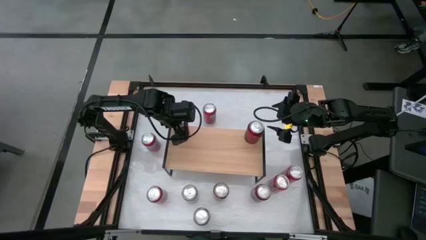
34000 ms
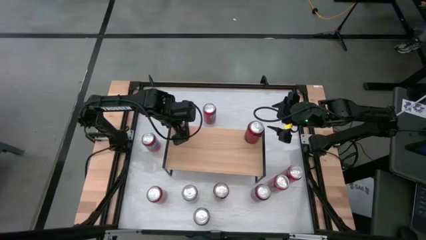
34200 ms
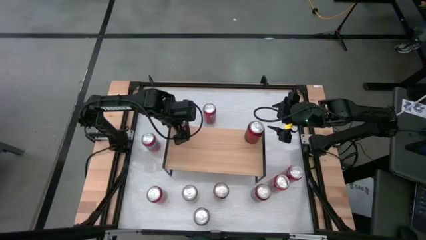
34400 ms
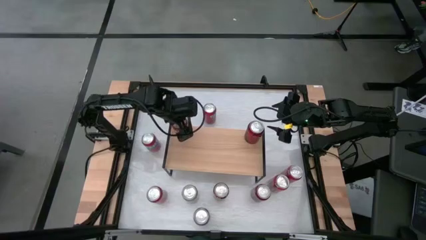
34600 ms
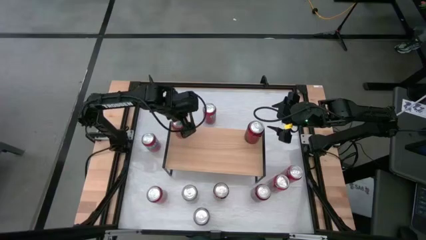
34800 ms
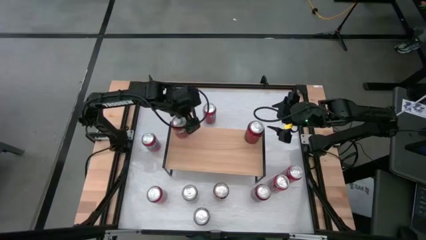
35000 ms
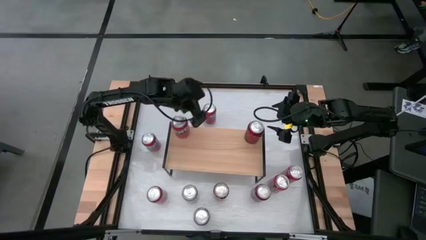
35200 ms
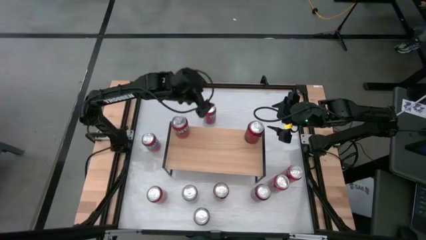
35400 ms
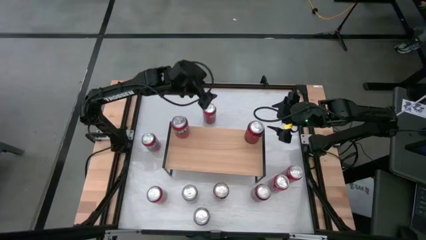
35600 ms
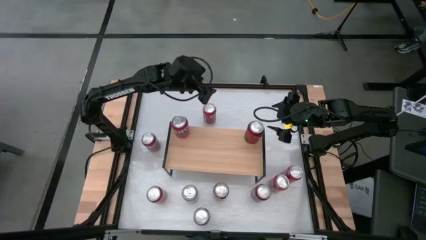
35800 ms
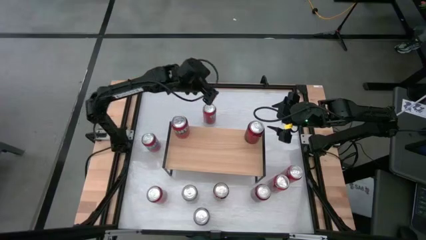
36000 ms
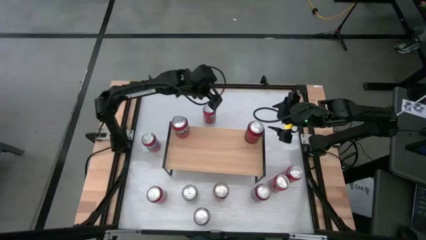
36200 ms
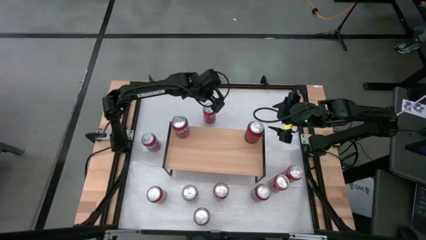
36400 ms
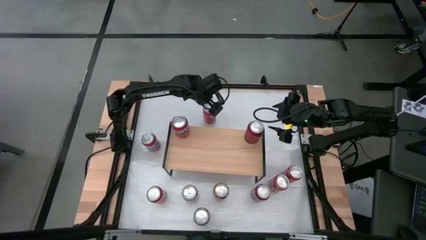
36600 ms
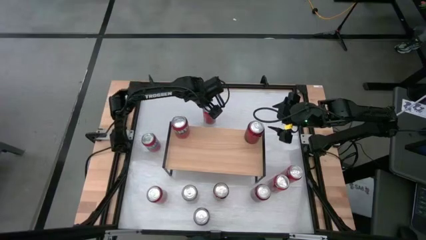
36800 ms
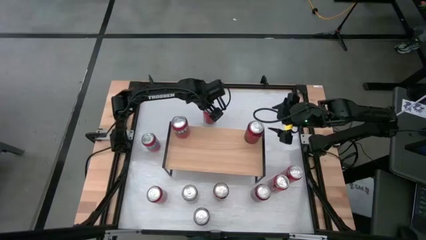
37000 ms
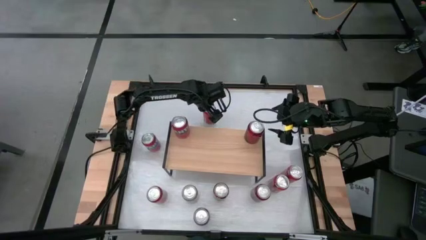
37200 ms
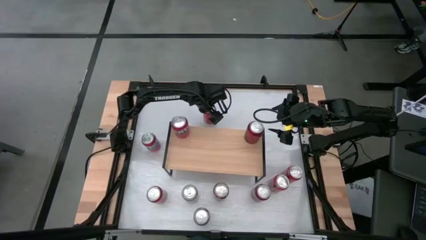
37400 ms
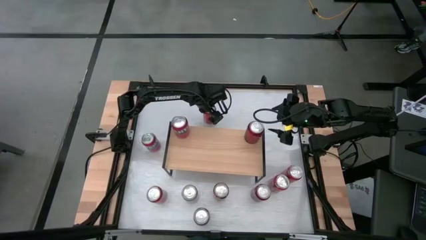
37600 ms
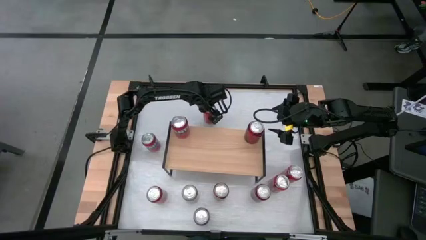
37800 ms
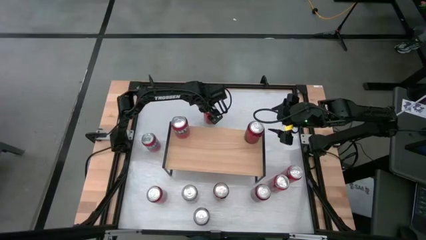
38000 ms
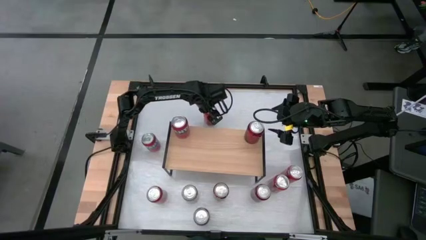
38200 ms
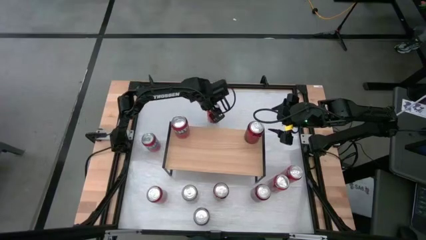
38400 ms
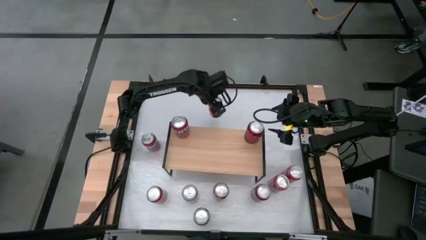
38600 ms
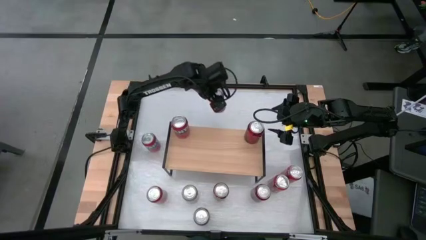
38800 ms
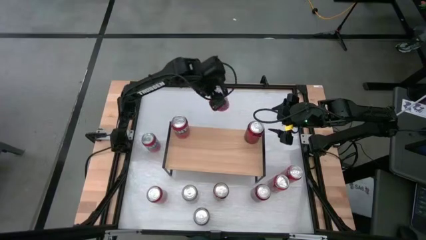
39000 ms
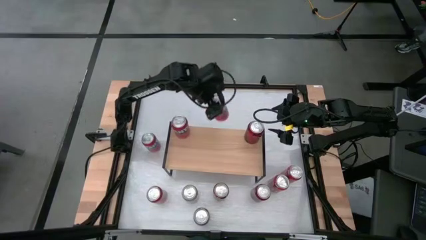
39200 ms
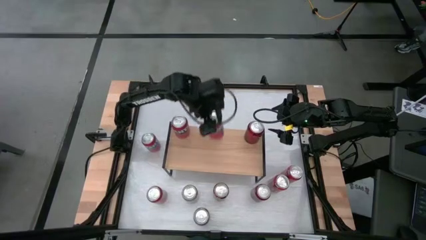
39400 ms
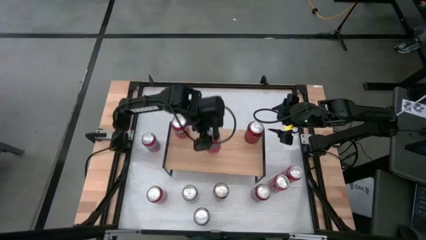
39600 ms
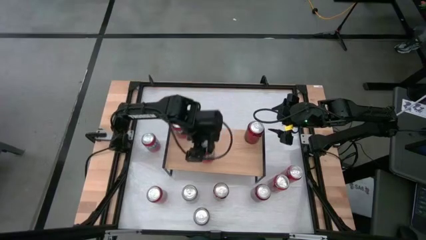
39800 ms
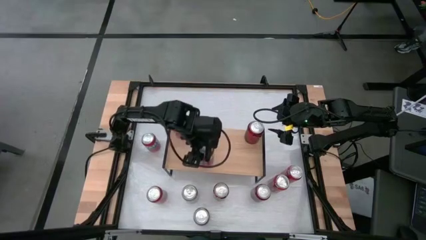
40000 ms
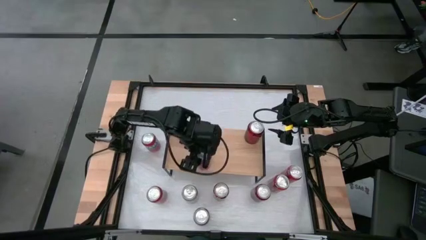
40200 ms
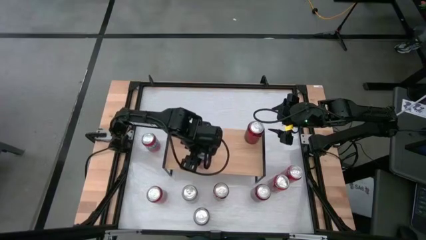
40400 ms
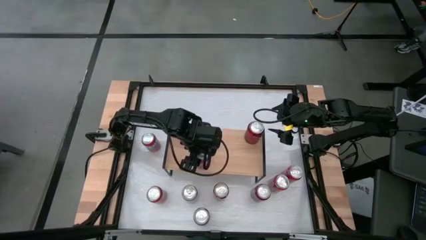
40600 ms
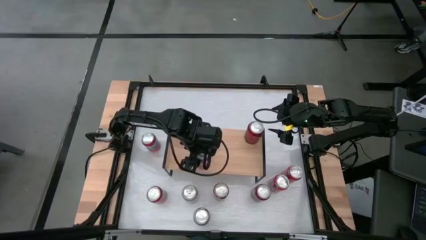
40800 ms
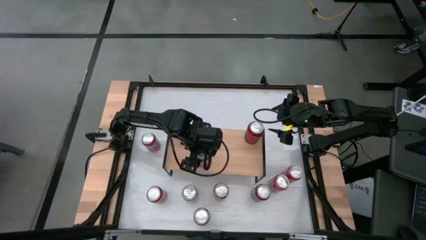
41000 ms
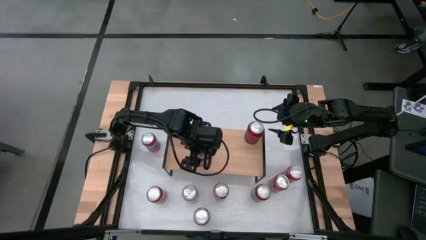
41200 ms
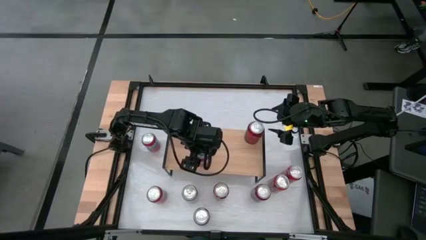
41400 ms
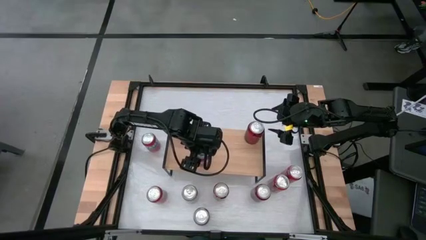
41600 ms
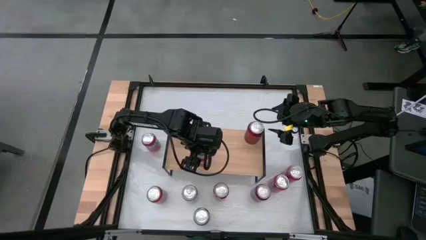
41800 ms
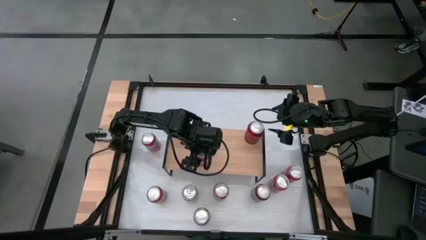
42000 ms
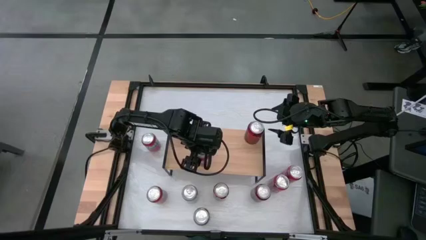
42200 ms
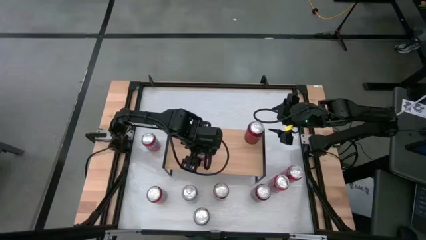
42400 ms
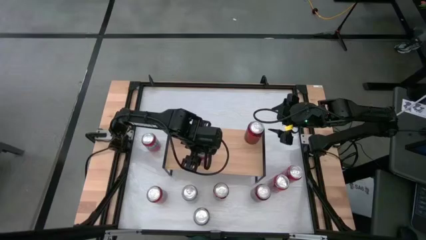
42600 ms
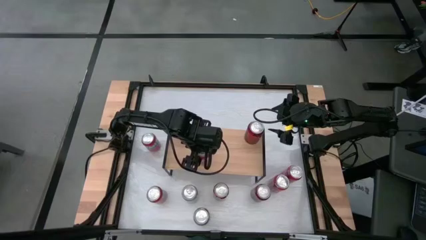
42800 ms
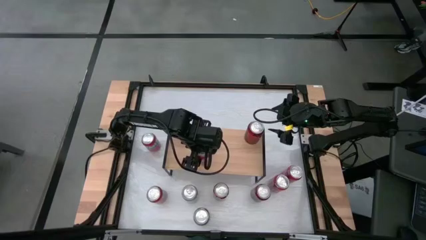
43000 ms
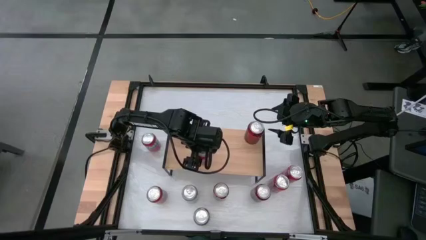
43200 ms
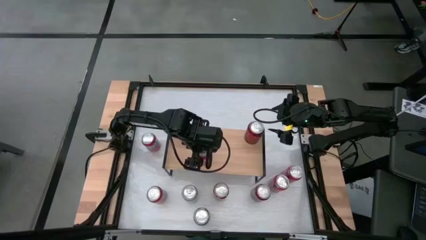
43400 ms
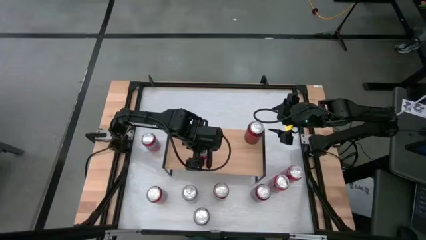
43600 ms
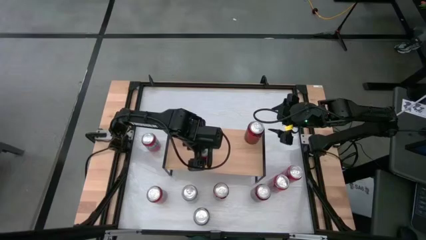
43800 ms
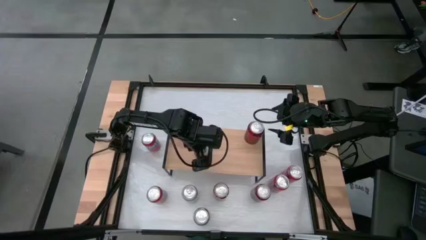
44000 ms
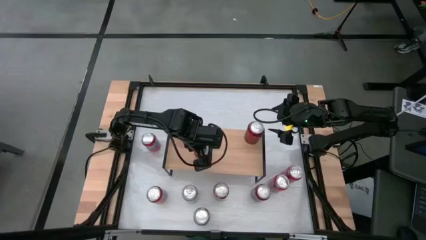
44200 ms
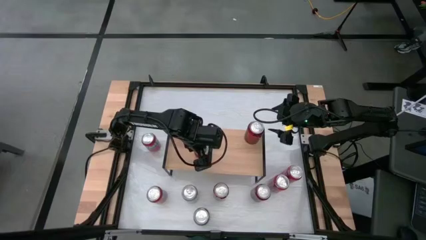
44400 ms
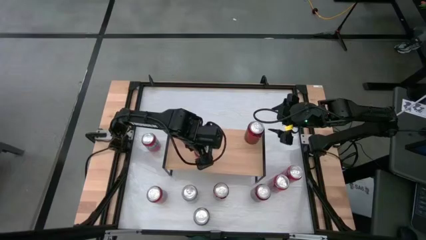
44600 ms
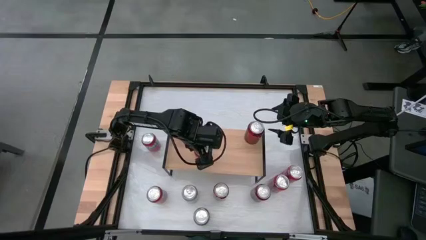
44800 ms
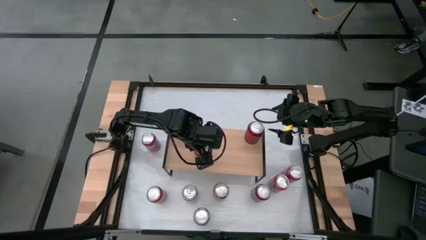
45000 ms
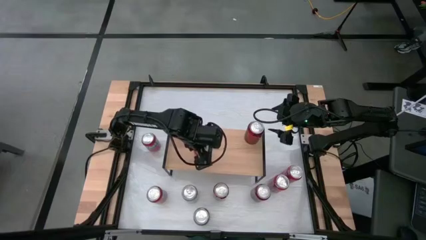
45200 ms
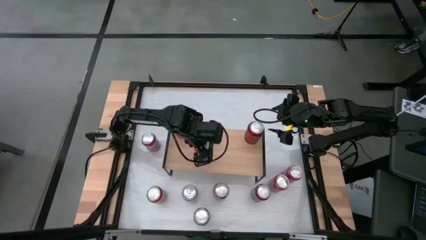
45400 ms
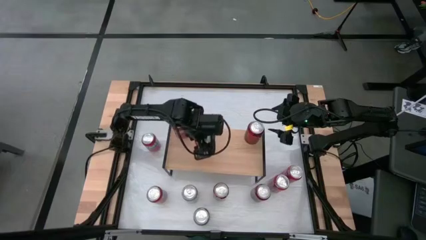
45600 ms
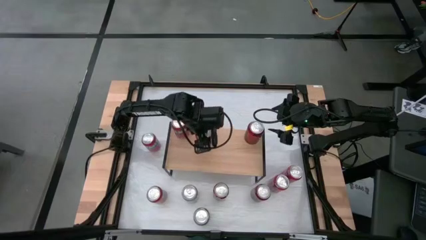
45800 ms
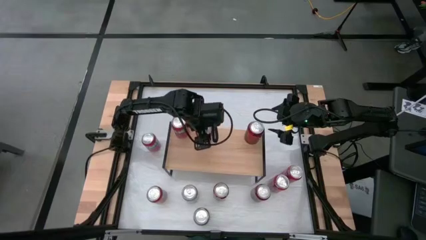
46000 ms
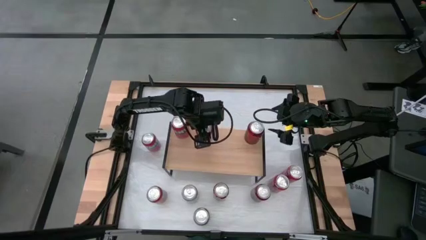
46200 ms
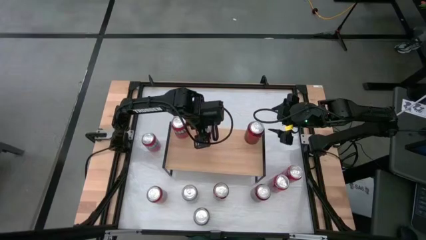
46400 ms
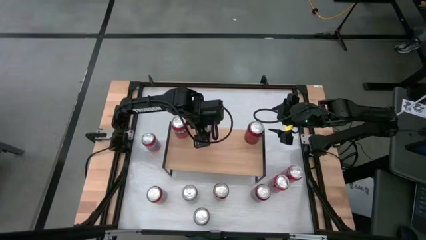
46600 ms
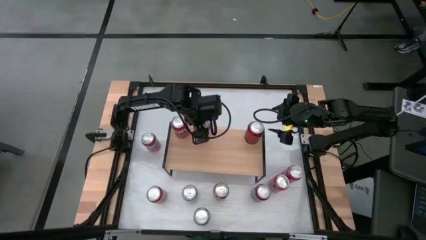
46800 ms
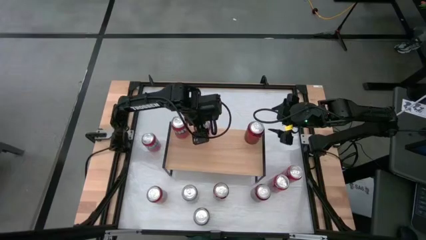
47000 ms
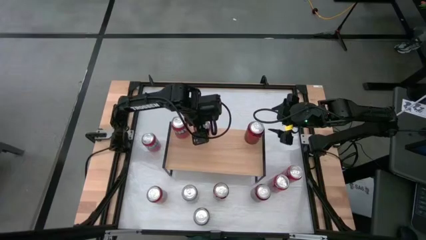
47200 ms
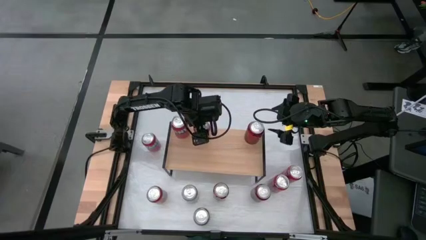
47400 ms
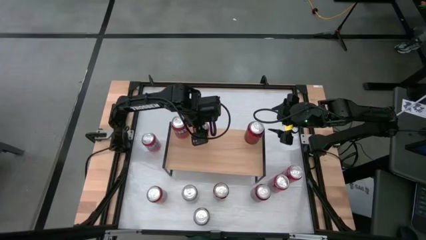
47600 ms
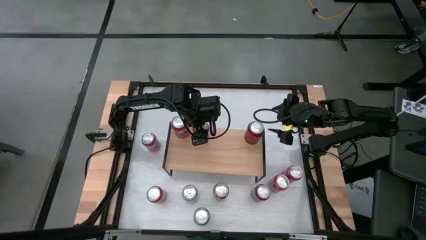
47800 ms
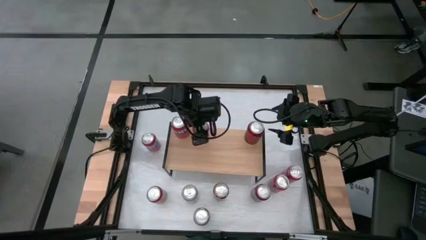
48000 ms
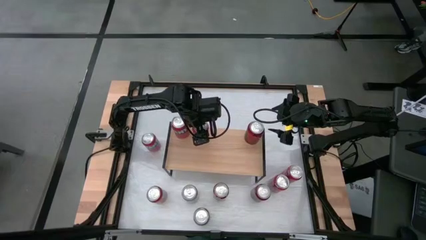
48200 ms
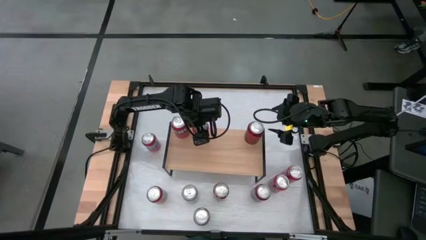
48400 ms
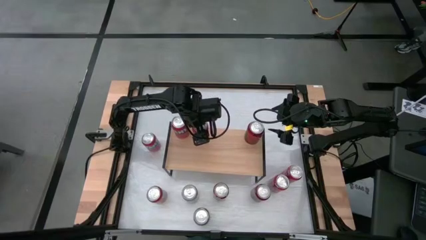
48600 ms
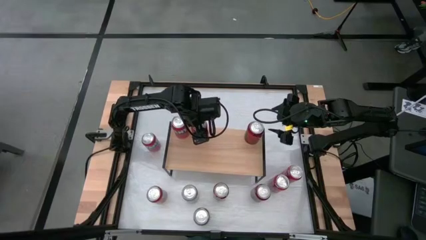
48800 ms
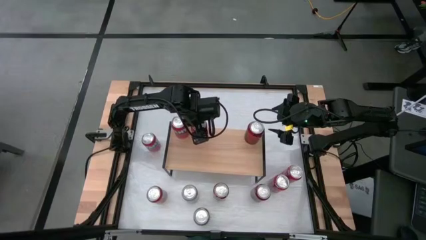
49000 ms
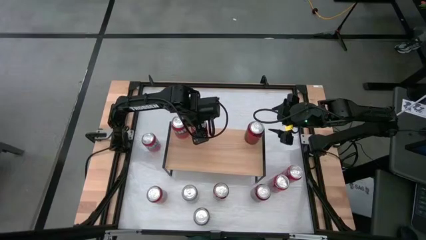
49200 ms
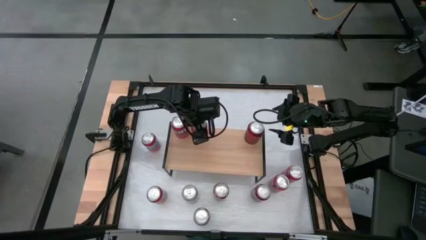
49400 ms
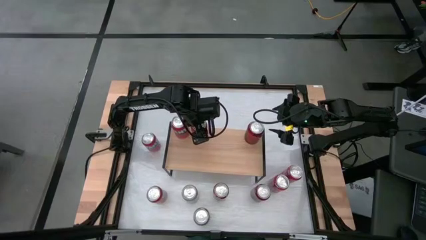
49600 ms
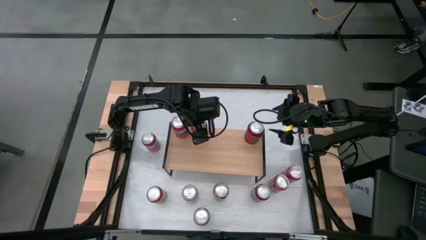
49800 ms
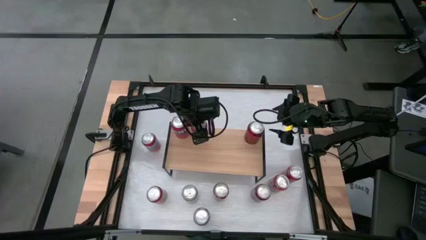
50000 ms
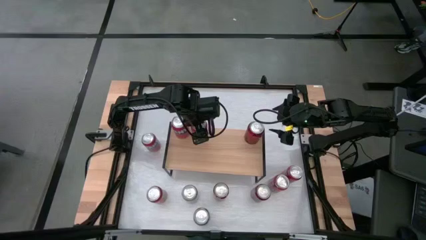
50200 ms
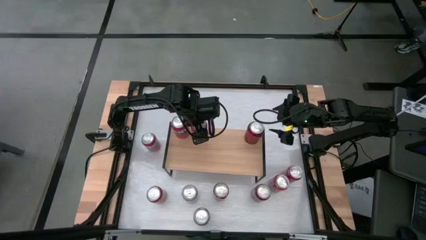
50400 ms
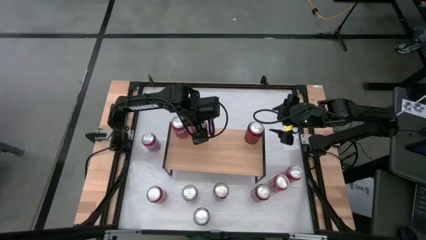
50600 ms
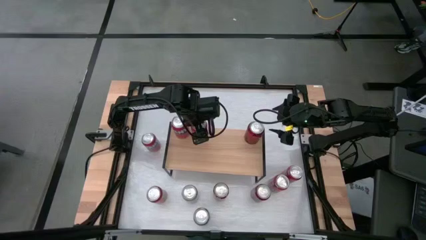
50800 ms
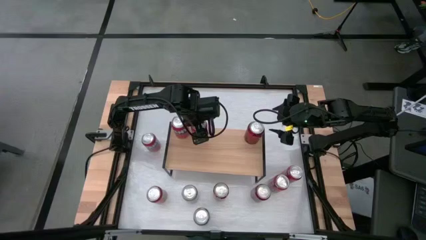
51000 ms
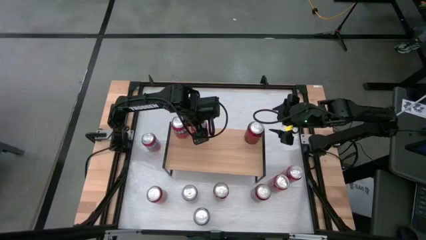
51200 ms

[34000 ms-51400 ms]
Task: Place canned beverage on shelf
Put the red soda can on the shelf
